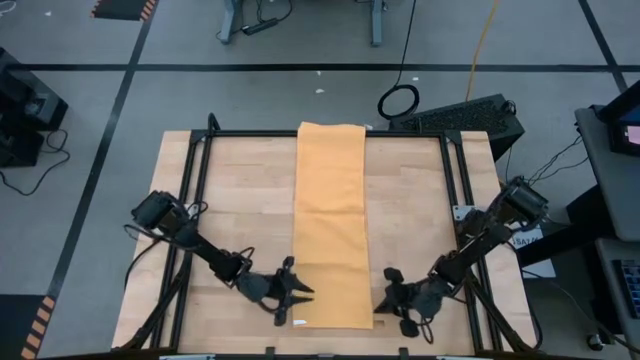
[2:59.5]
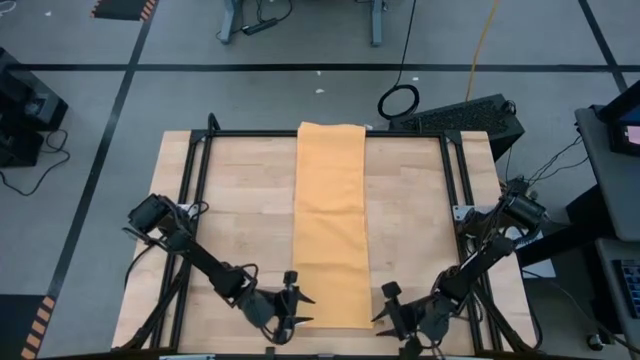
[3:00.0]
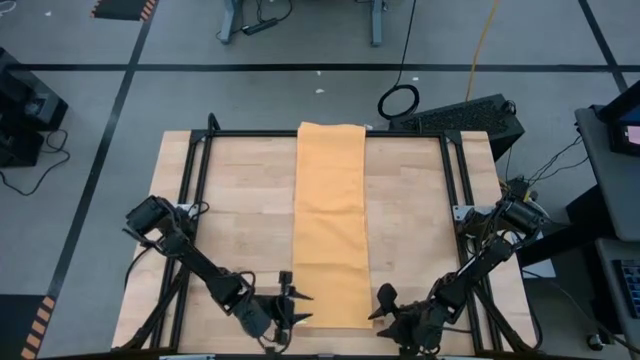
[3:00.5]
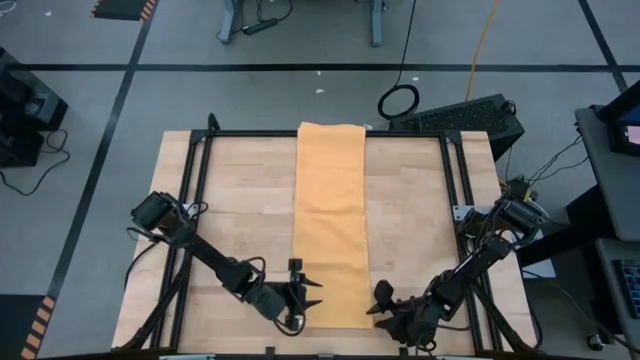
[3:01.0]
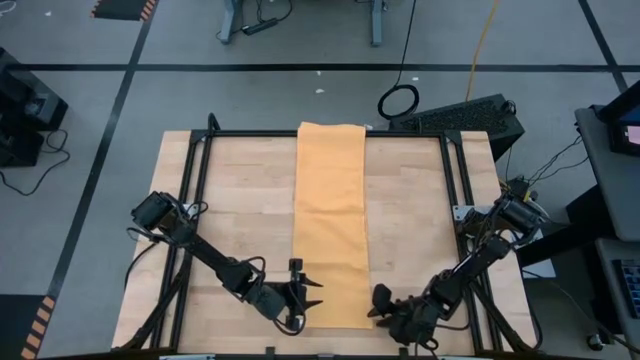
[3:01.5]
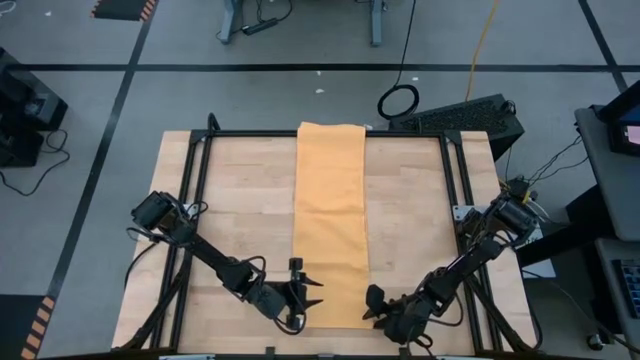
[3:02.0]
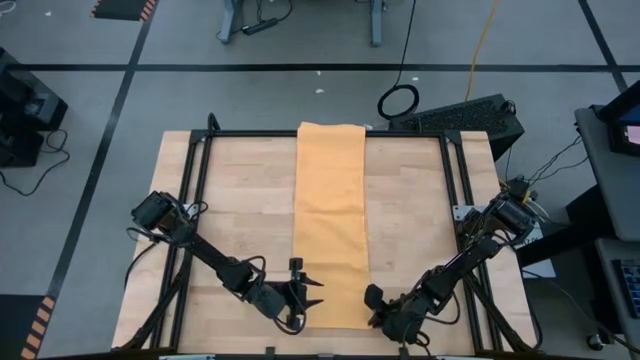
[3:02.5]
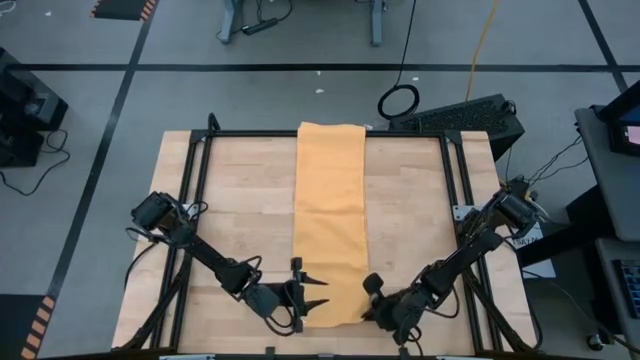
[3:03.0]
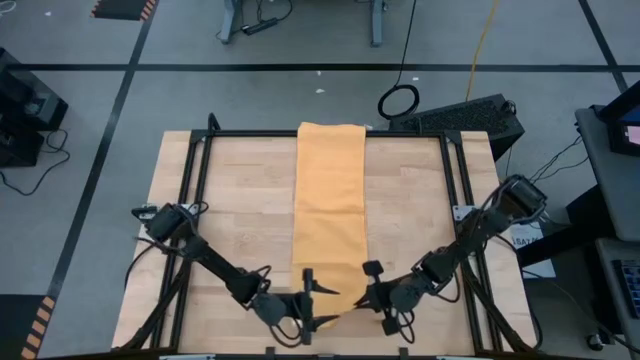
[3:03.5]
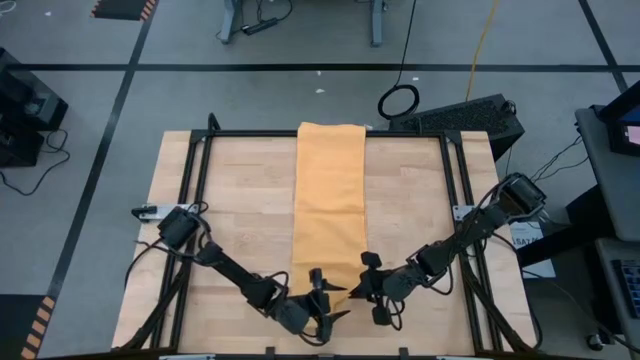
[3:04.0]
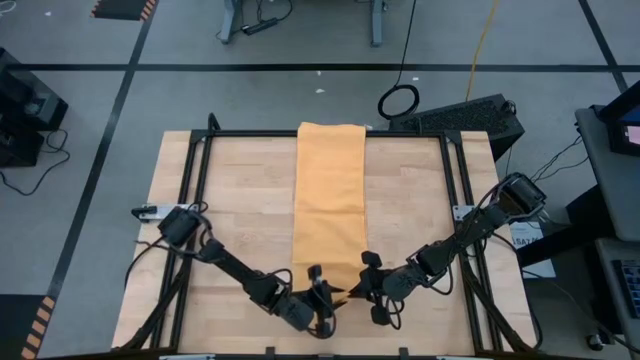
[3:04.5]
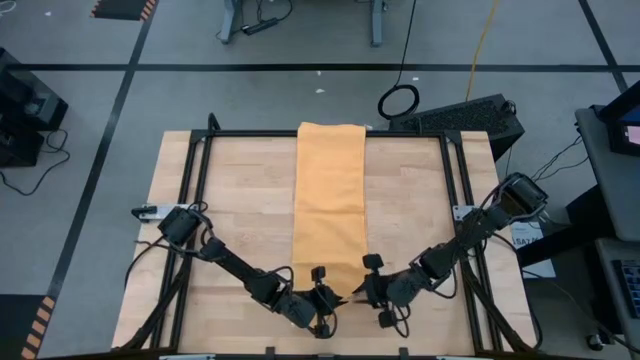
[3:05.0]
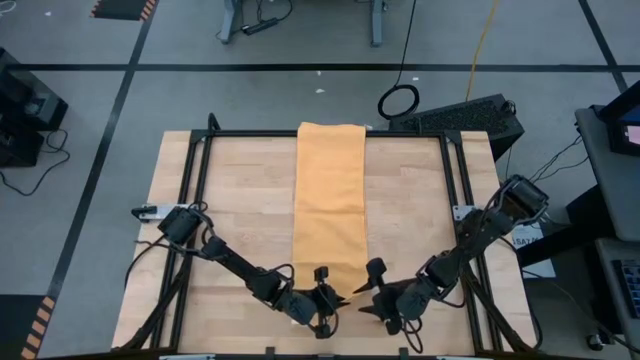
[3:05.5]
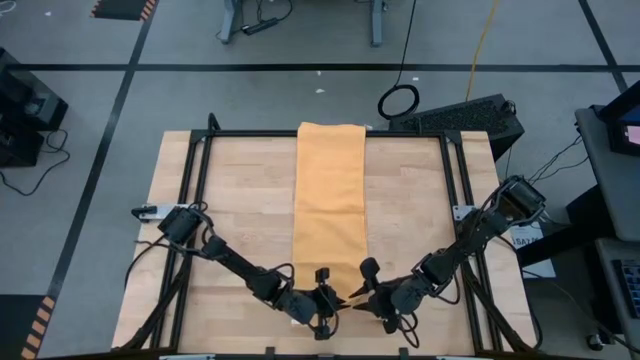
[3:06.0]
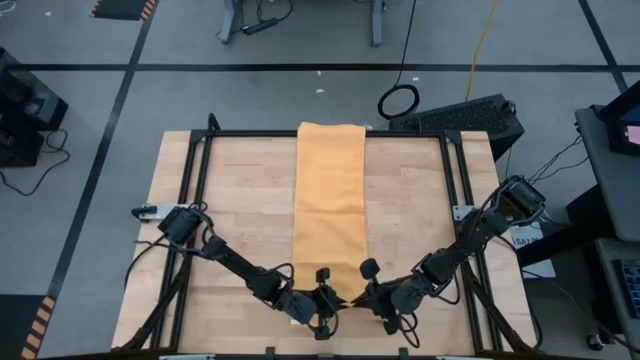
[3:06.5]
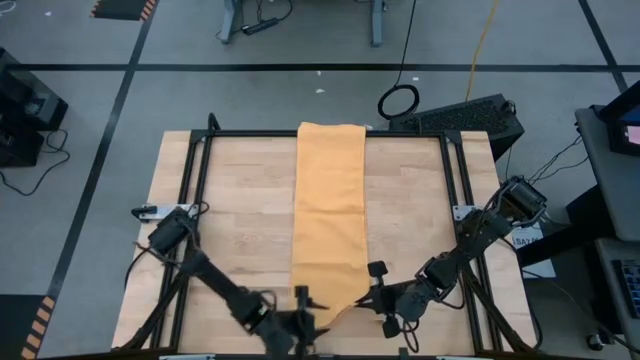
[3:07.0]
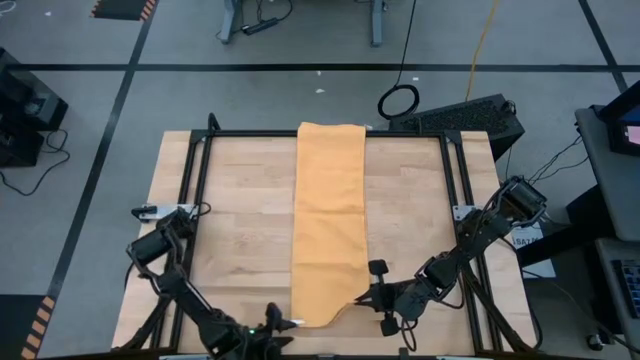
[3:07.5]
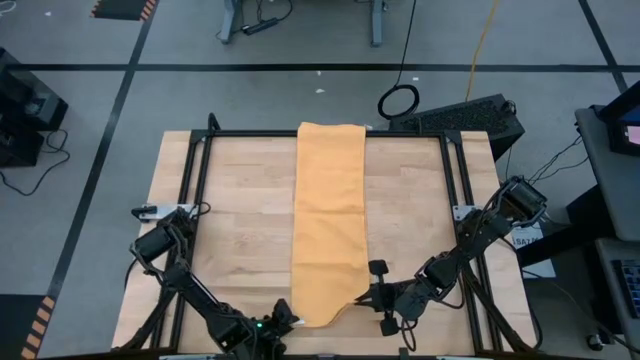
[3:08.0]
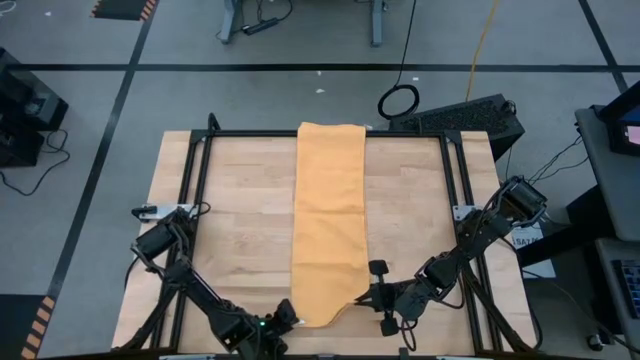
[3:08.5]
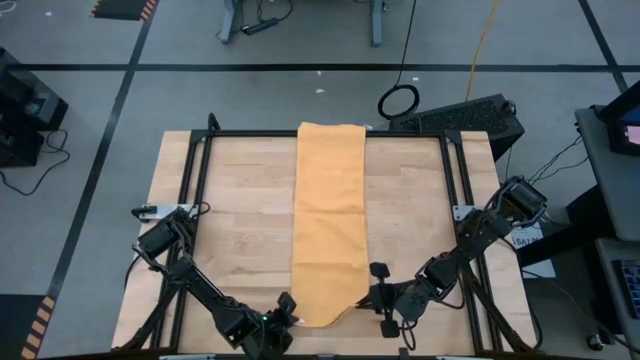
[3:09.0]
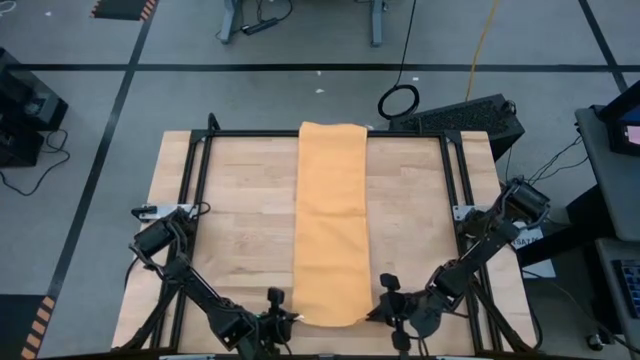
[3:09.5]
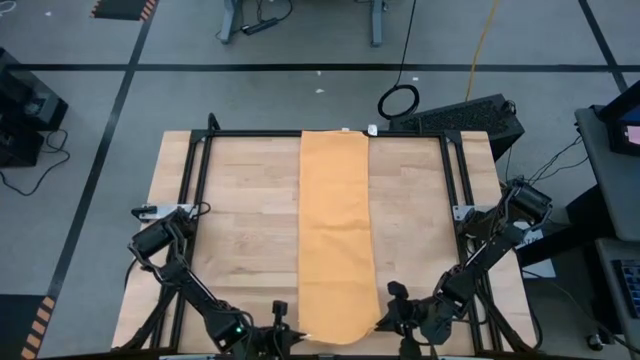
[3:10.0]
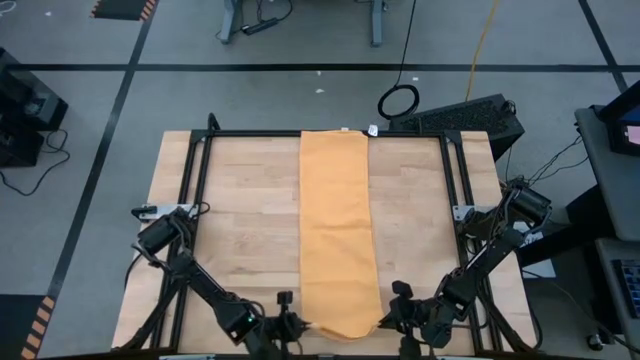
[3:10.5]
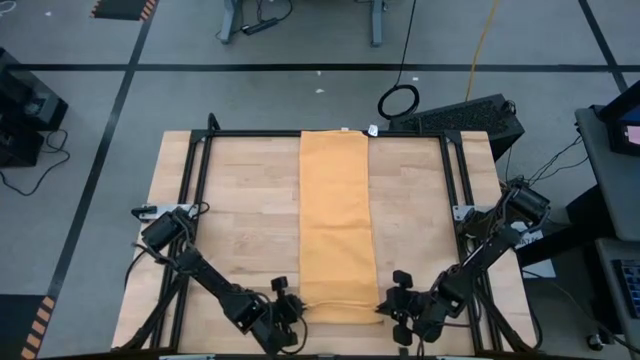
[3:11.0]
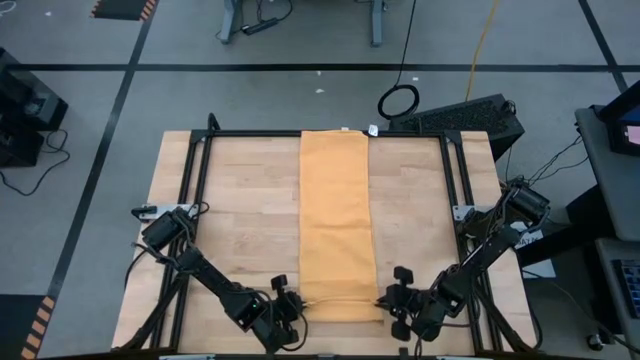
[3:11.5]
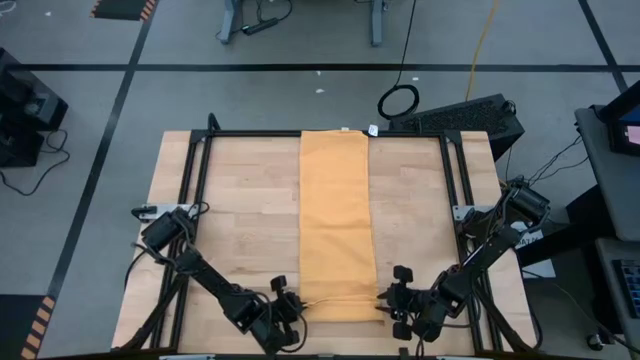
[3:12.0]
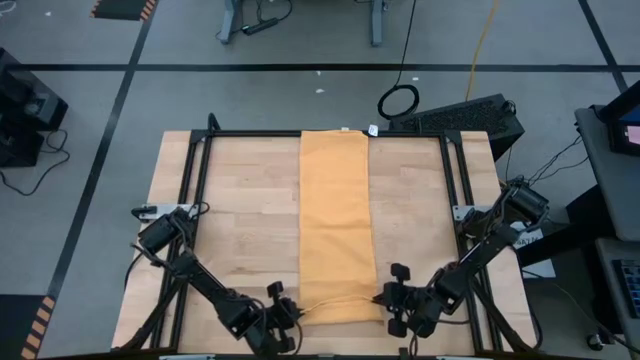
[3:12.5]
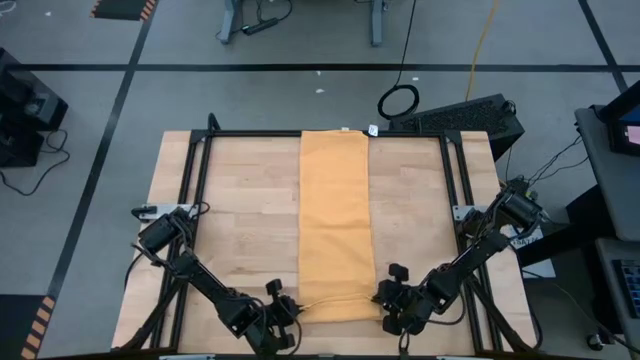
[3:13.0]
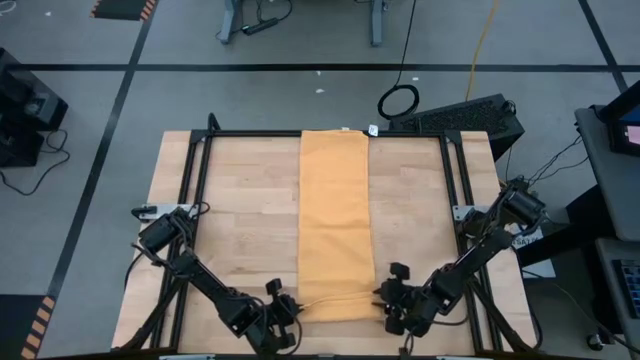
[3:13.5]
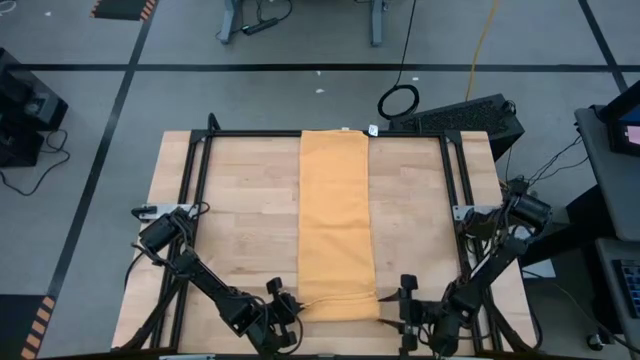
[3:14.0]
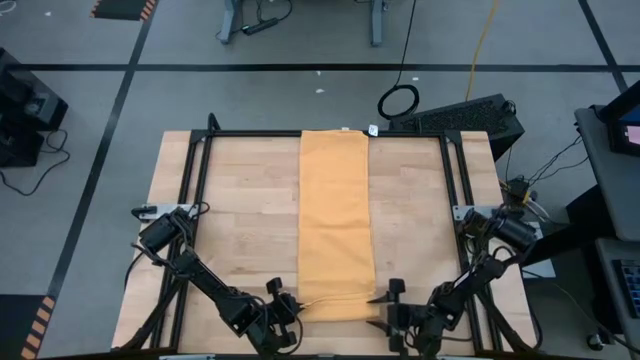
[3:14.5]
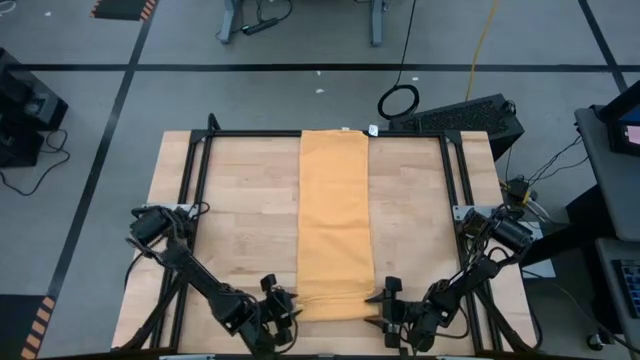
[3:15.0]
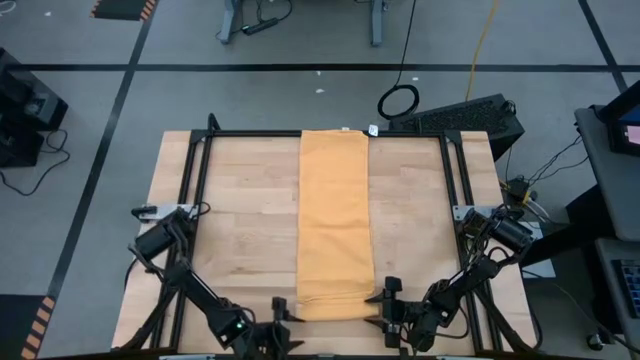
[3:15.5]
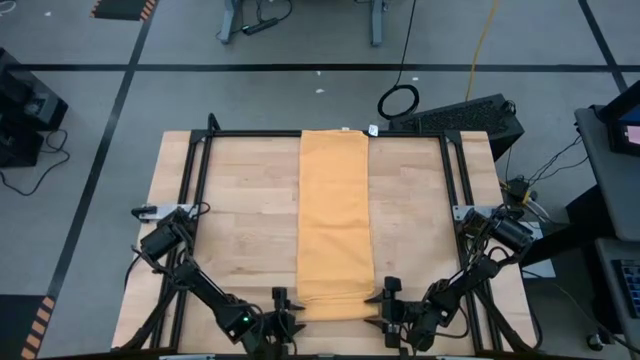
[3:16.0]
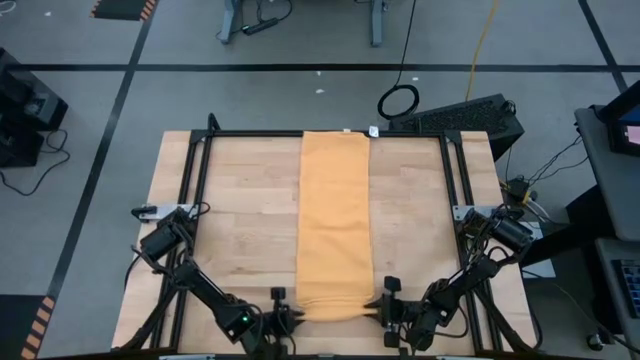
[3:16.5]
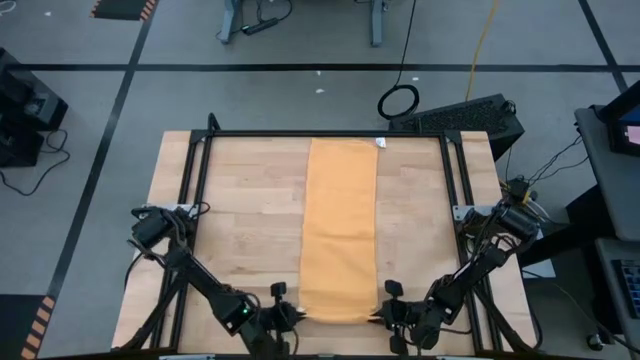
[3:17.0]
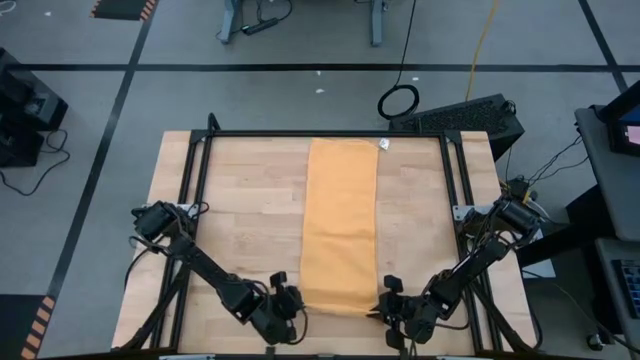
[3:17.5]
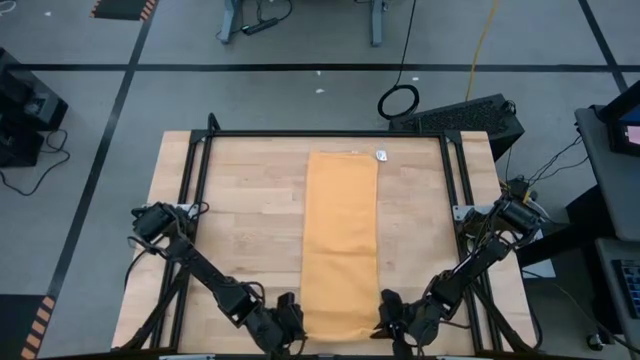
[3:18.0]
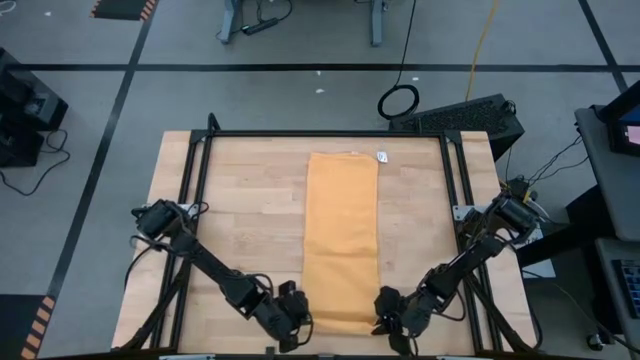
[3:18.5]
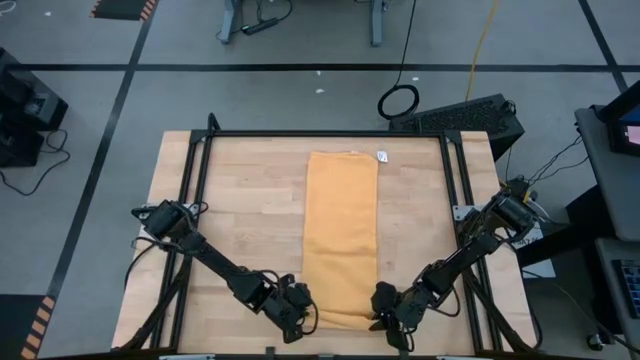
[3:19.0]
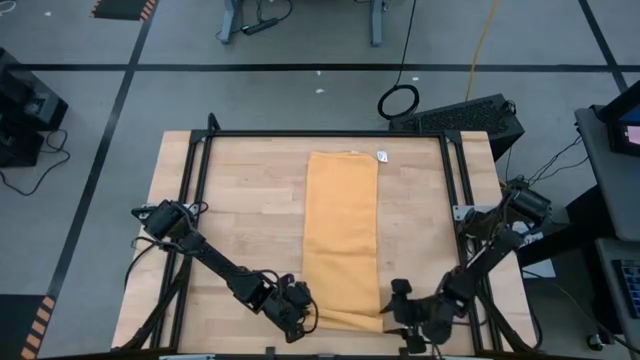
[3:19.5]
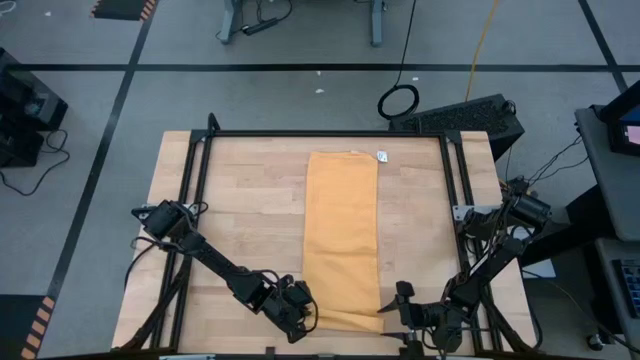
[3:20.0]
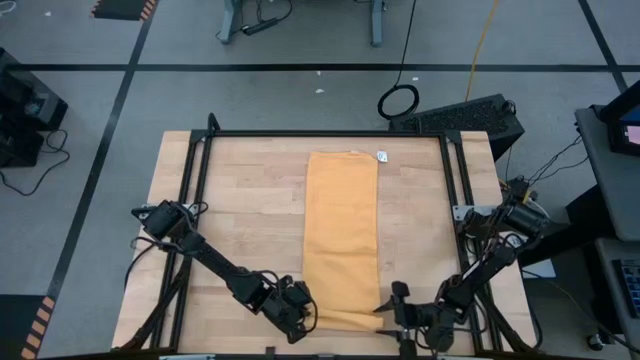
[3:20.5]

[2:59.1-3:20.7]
Task: Roll towel
Roll the yellow towel
